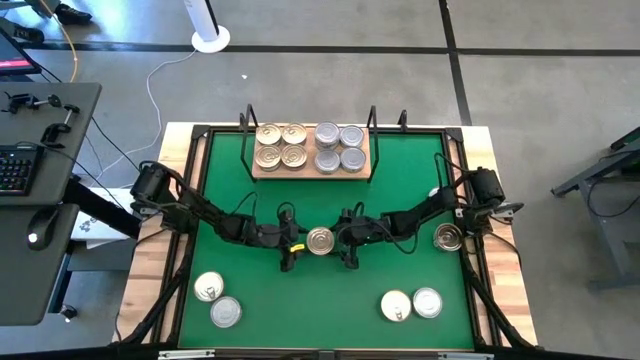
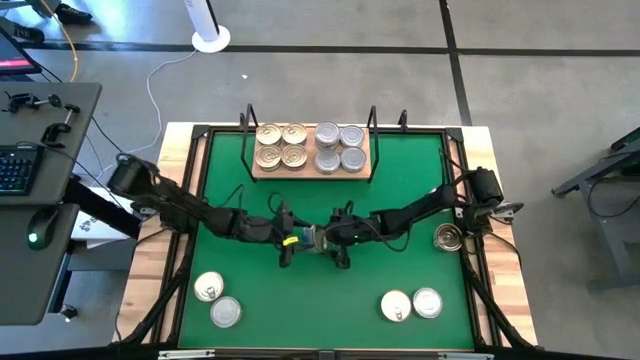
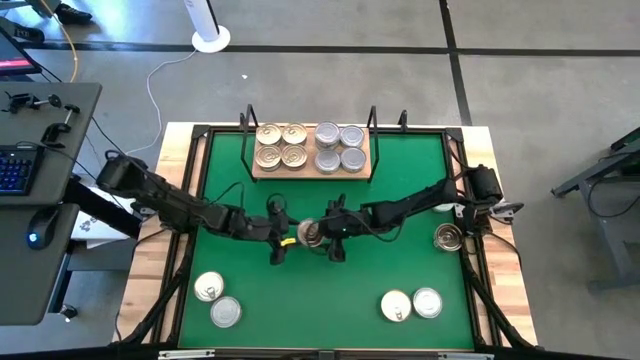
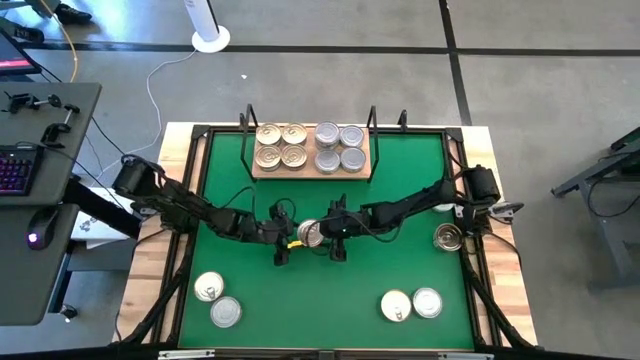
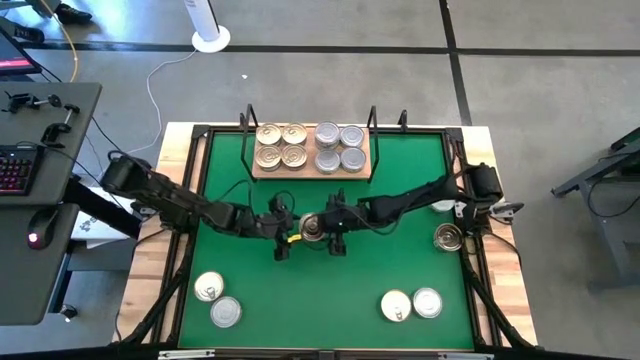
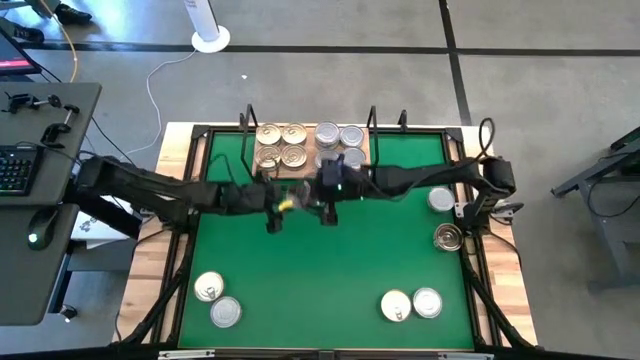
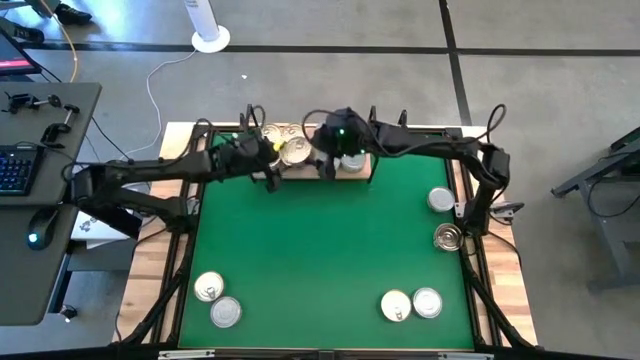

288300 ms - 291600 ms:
Task: Stack canned seafood by type on shelf
Stack the blue/pink tuna can on top of the other blue/pink tuna can on the shelf

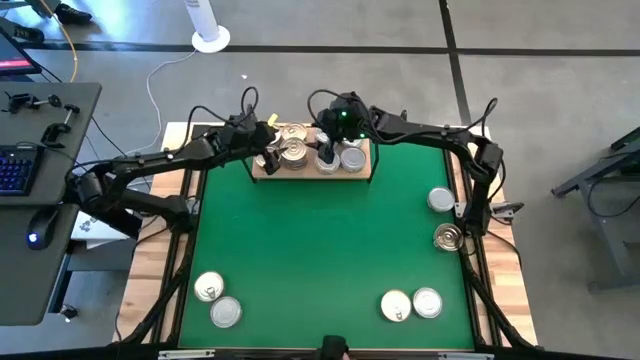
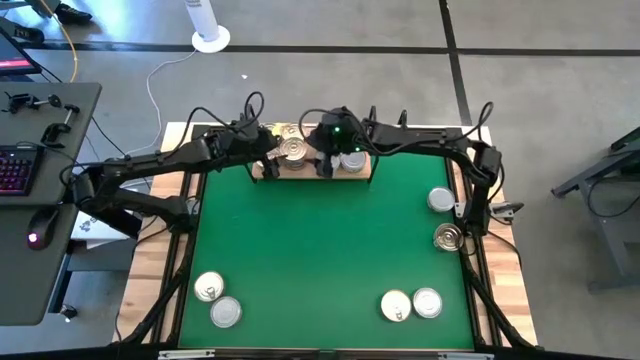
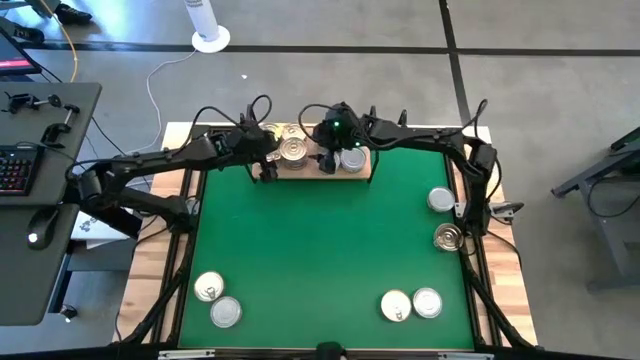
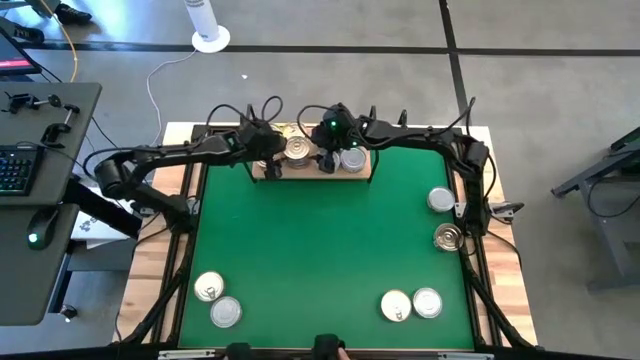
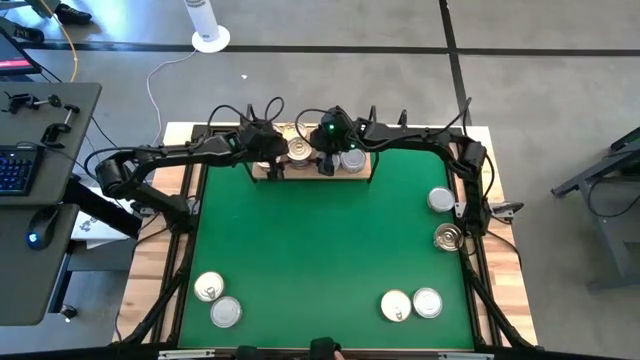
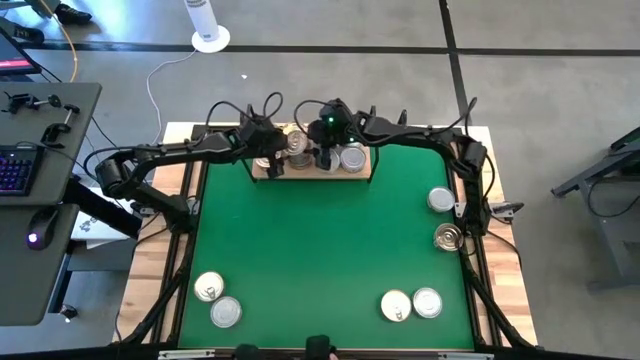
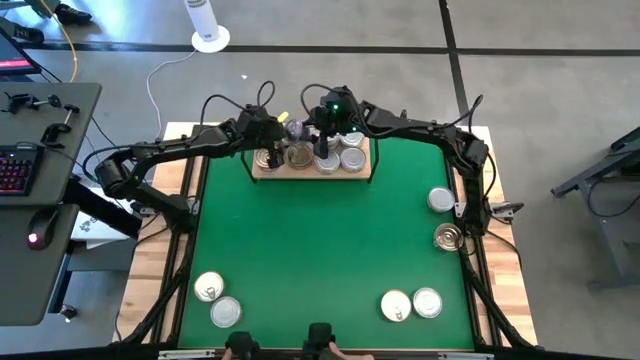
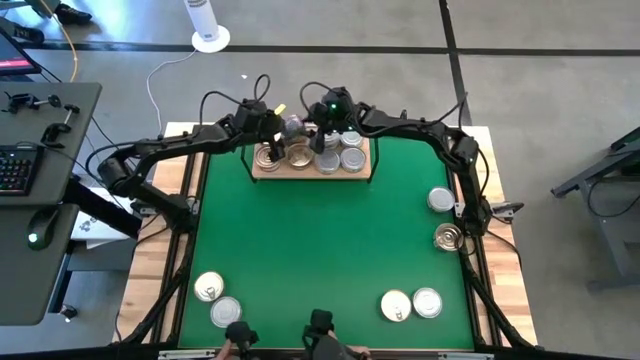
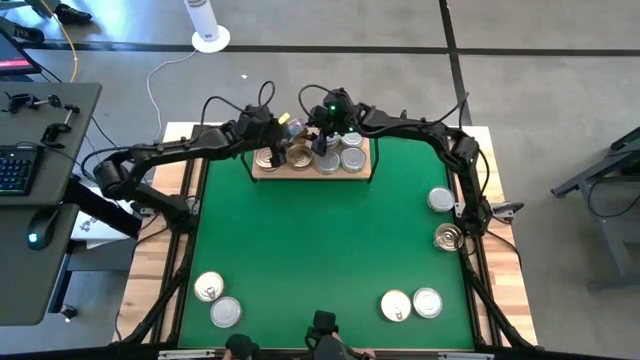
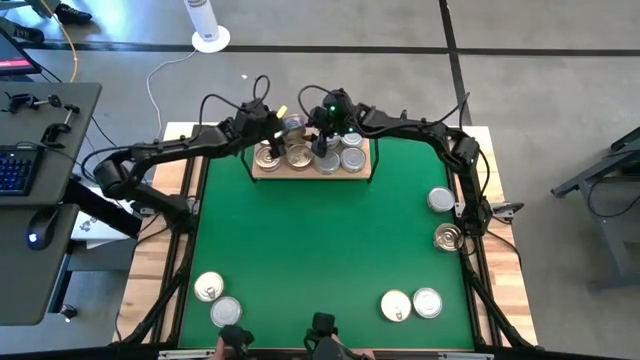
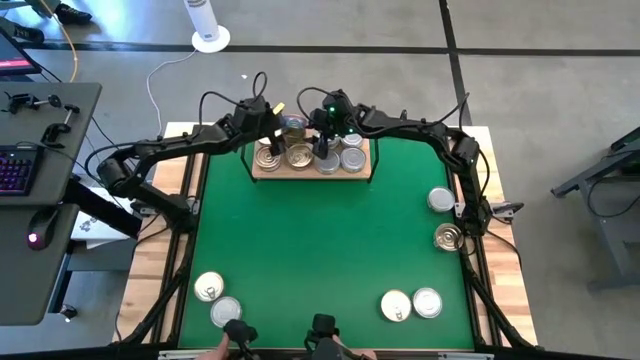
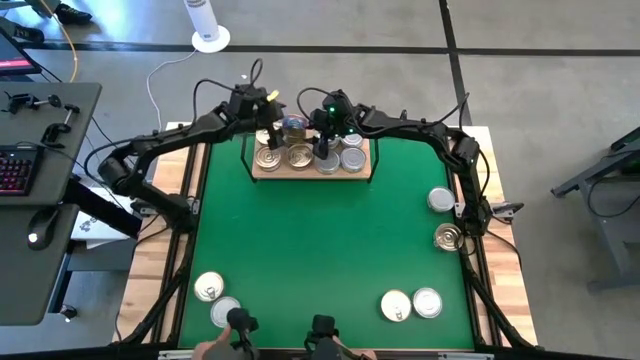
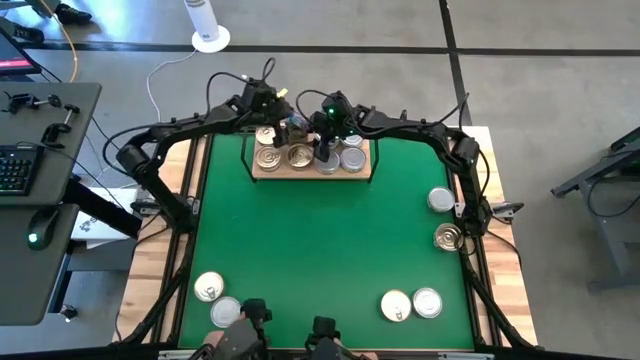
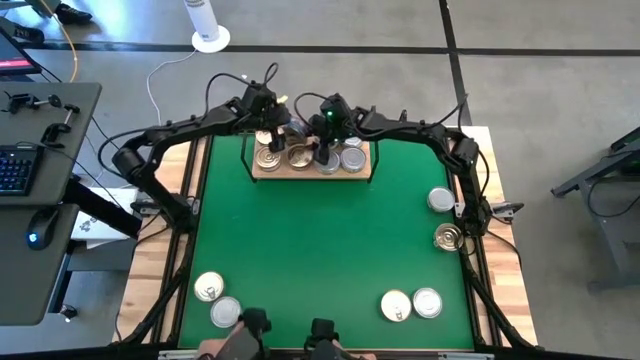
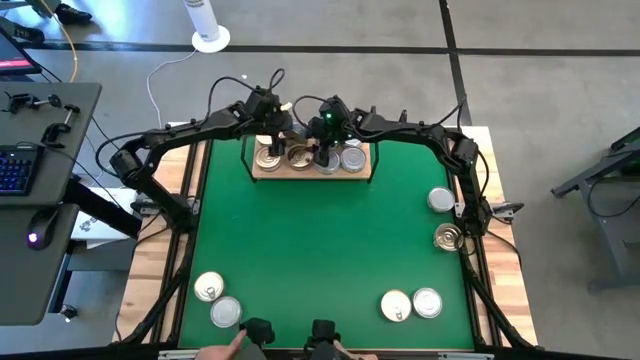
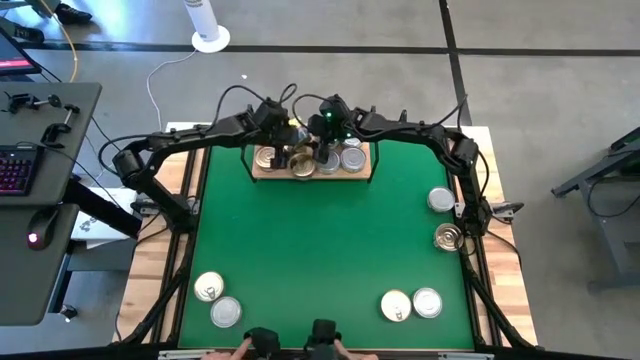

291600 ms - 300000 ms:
Stack the blue/pink tuna can on top of the other blue/pink tuna can on the shelf

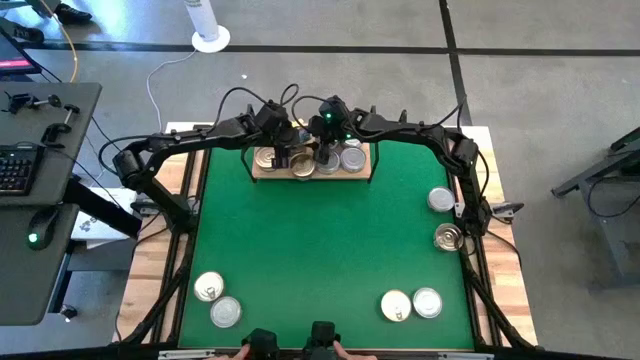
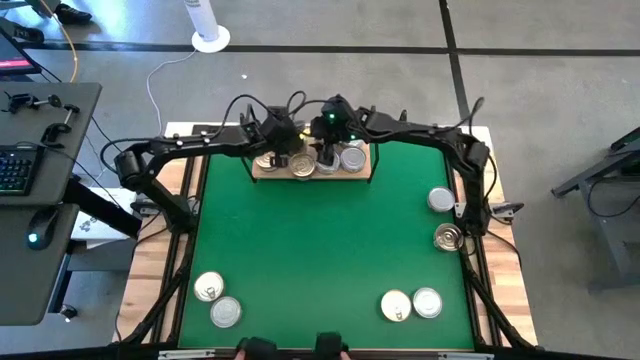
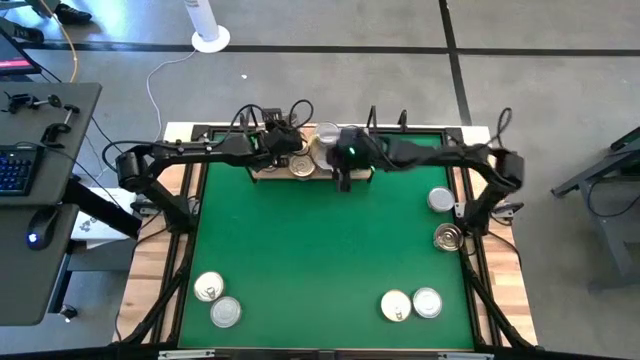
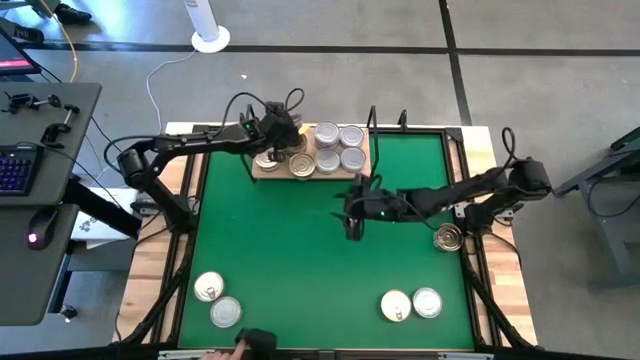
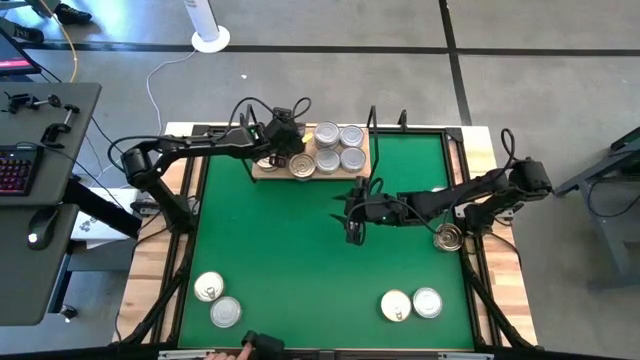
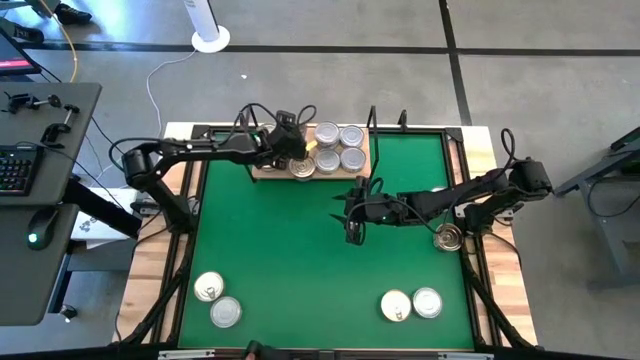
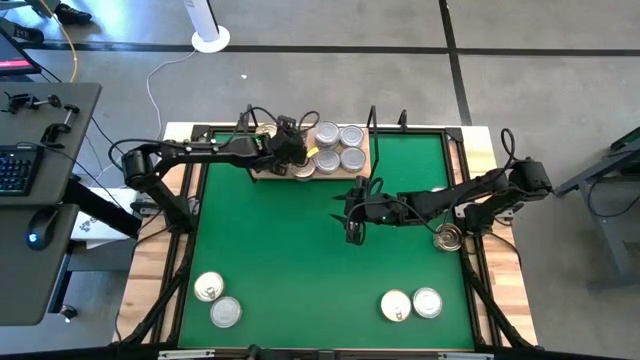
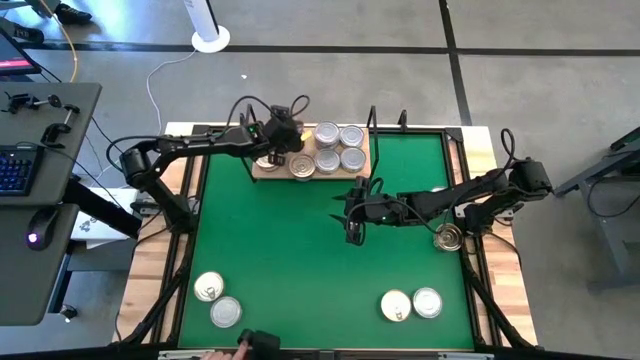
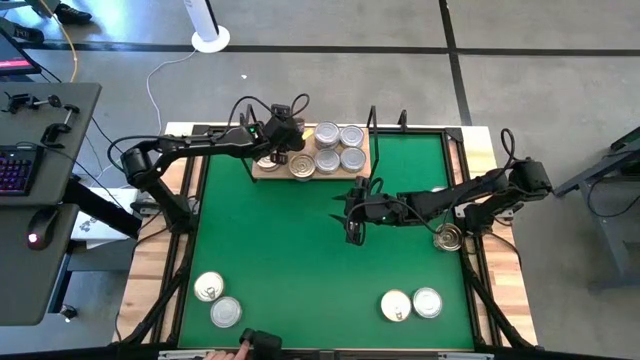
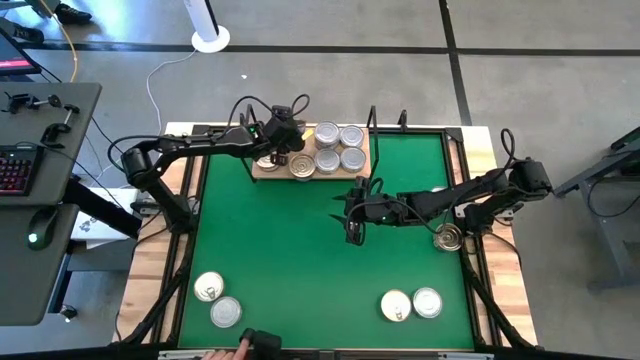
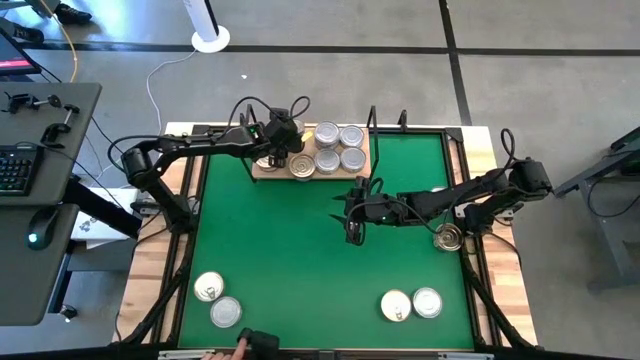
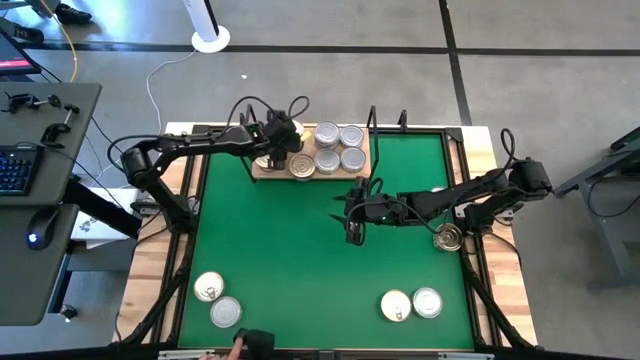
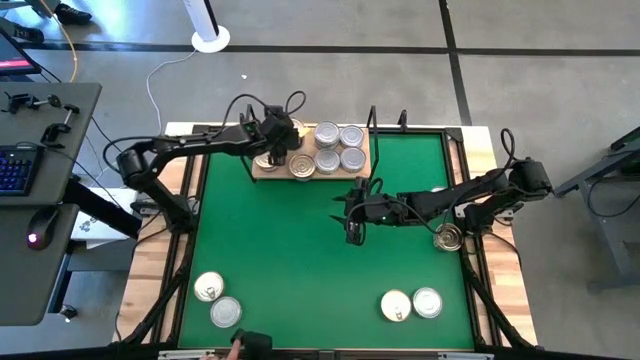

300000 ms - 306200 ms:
Stack the blue/pink tuna can on top of the other blue/pink tuna can on the shelf

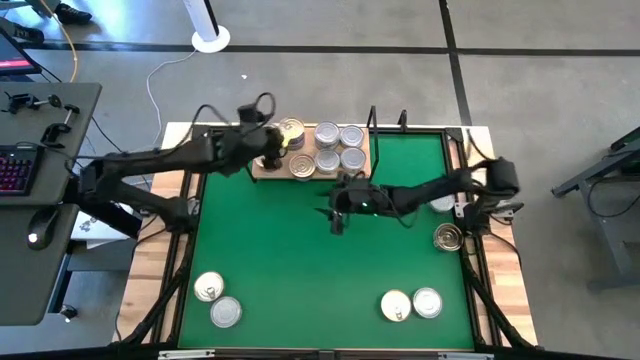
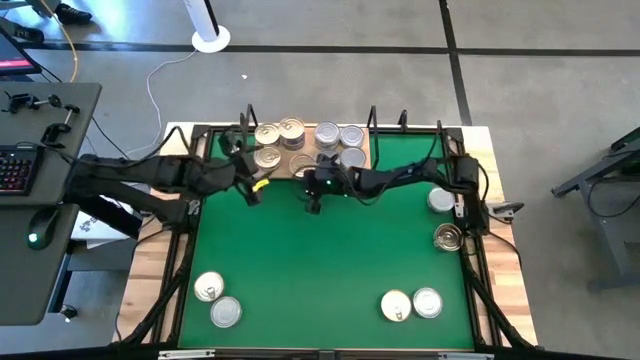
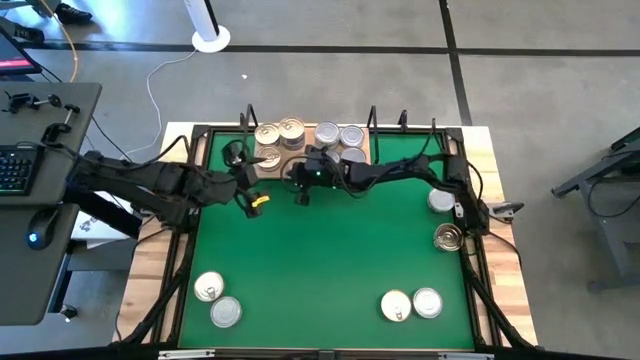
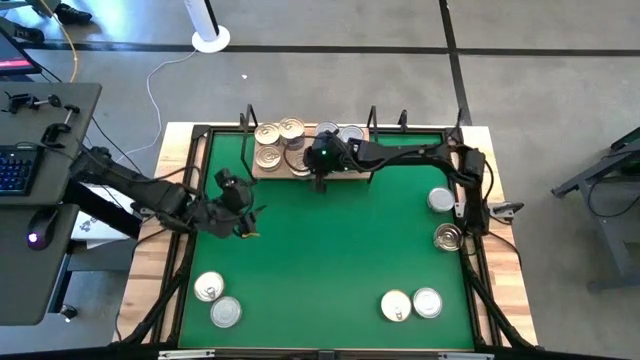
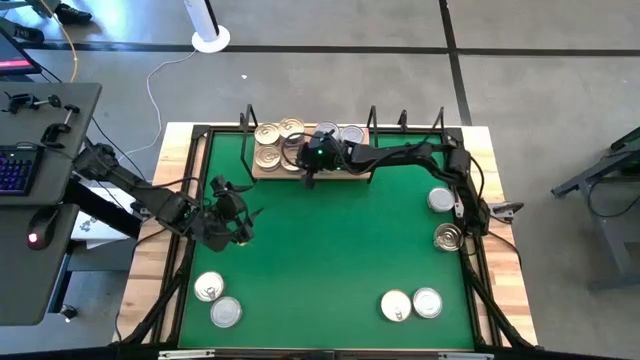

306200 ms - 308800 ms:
Adjust the blue/pink tuna can on the shelf
